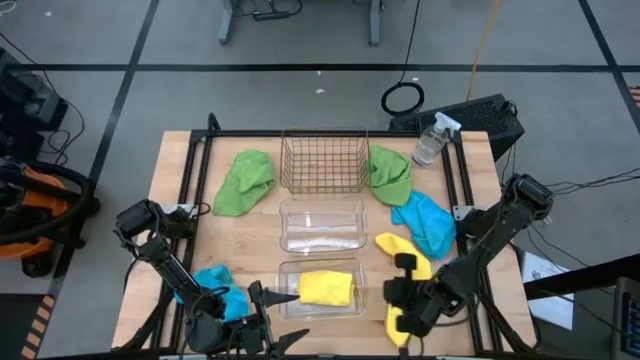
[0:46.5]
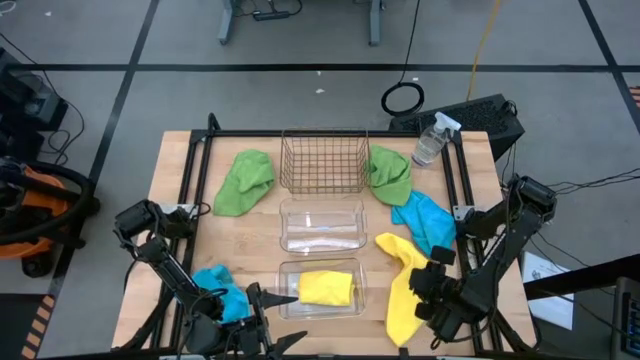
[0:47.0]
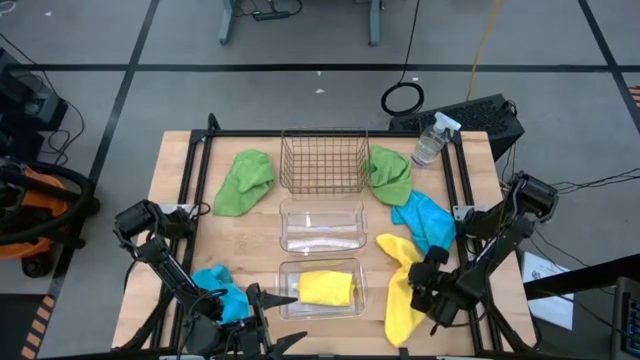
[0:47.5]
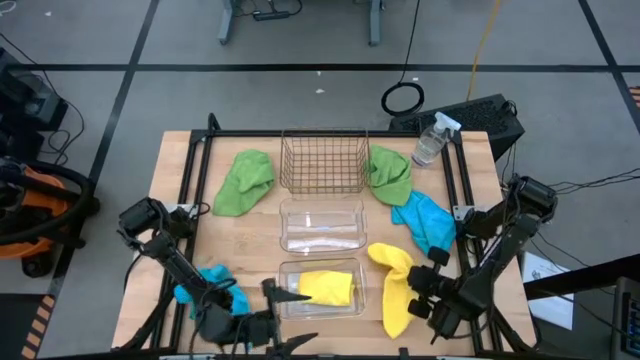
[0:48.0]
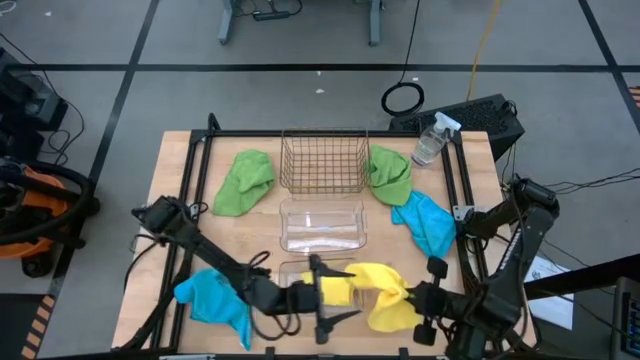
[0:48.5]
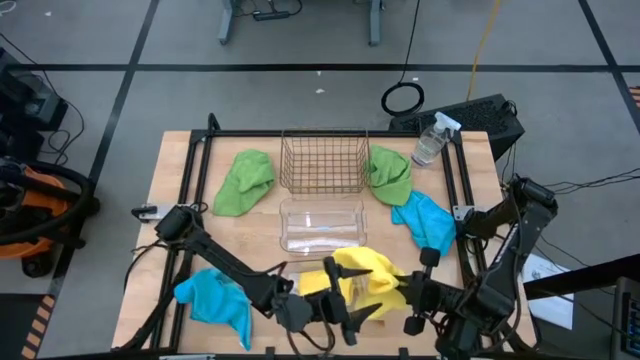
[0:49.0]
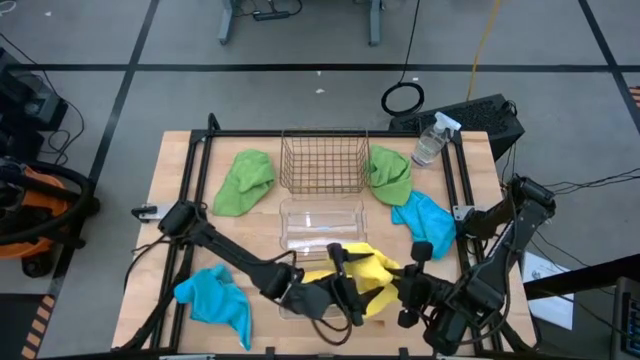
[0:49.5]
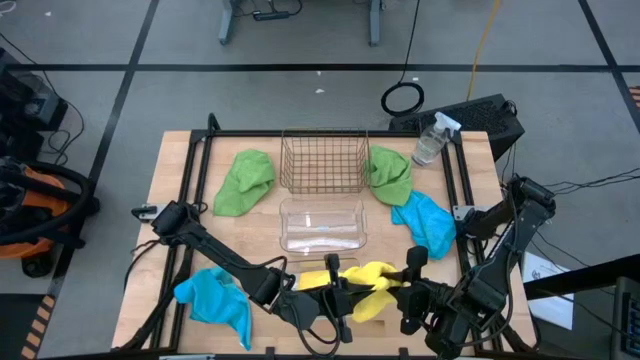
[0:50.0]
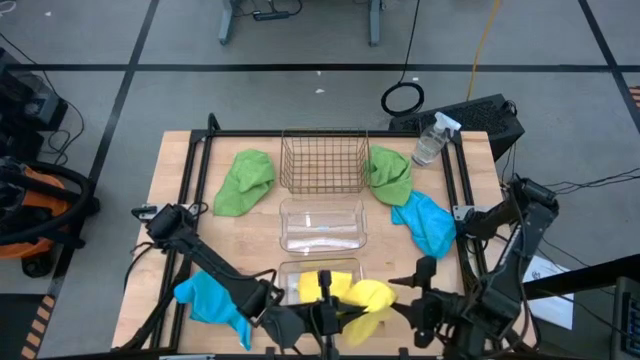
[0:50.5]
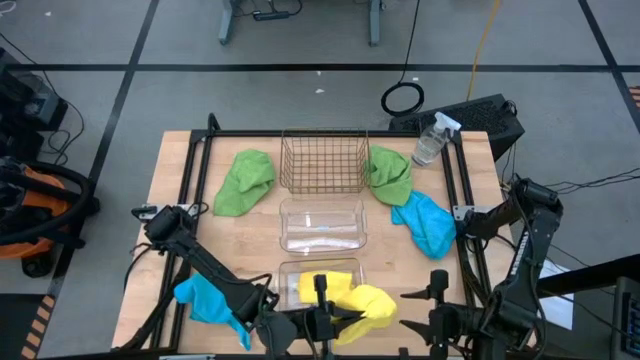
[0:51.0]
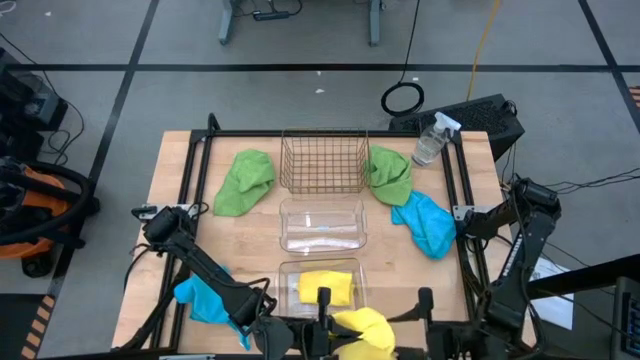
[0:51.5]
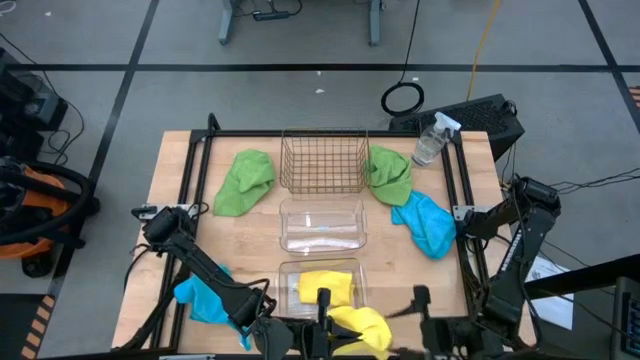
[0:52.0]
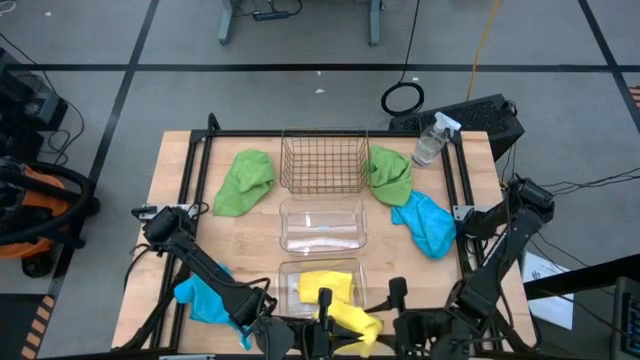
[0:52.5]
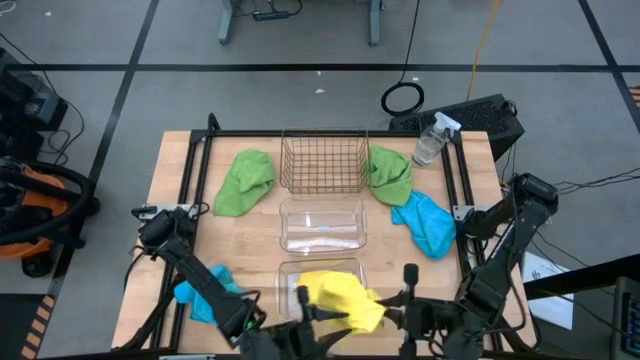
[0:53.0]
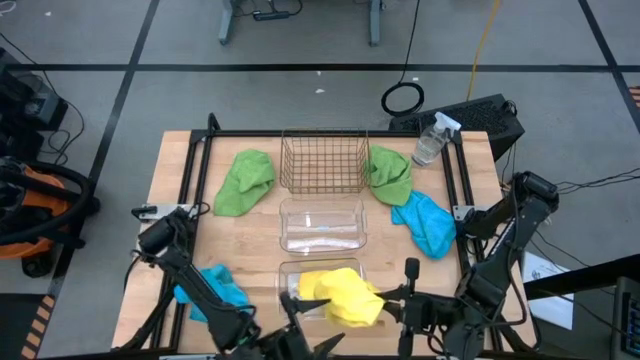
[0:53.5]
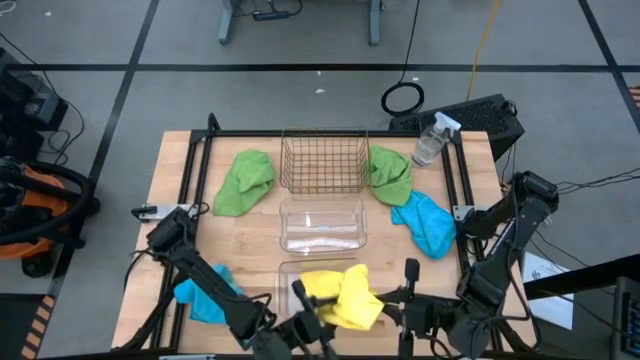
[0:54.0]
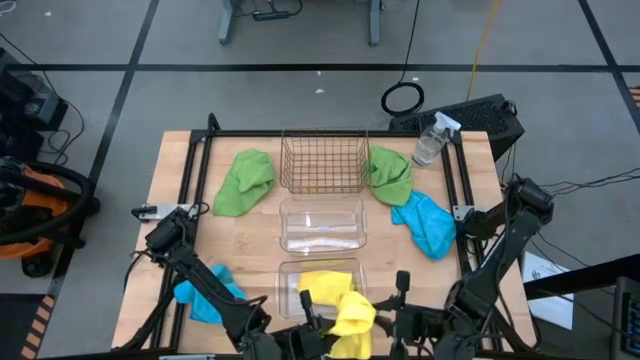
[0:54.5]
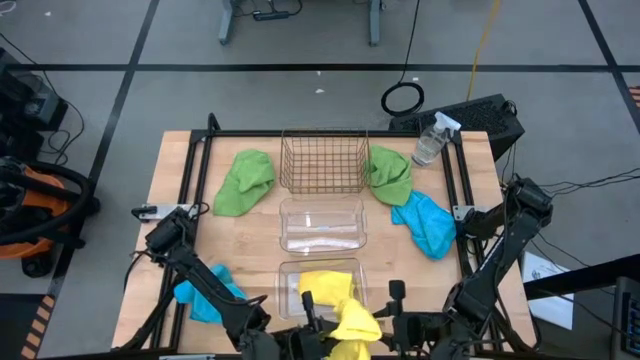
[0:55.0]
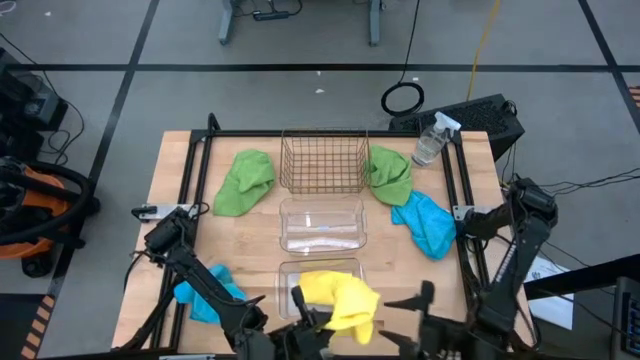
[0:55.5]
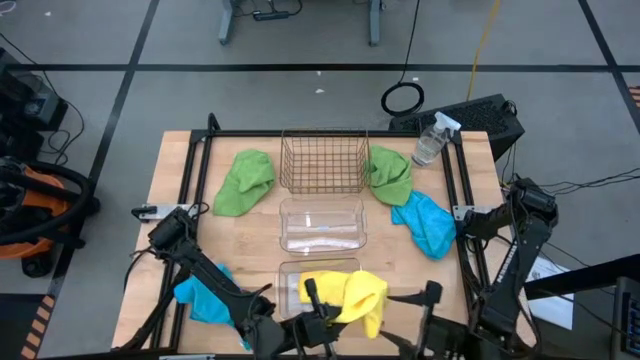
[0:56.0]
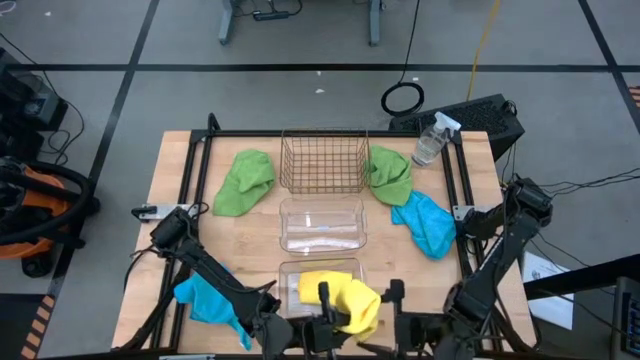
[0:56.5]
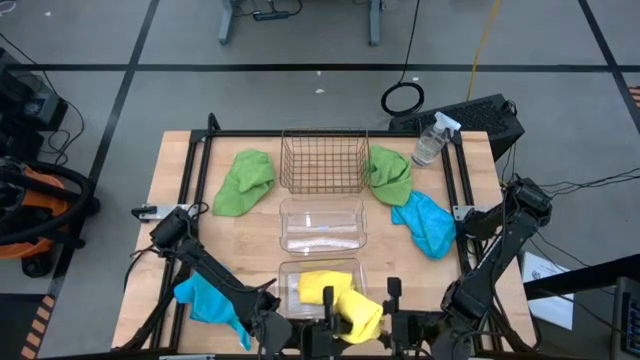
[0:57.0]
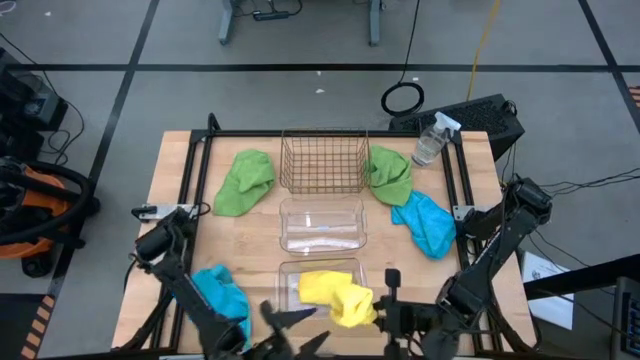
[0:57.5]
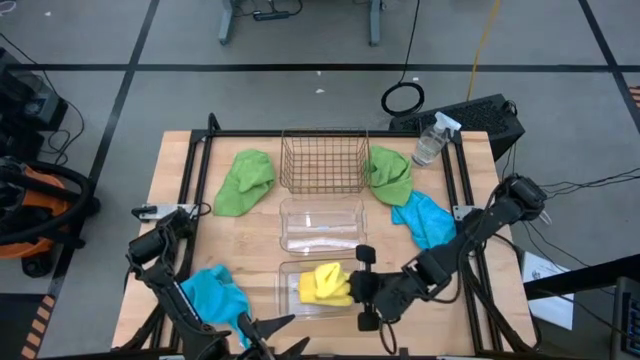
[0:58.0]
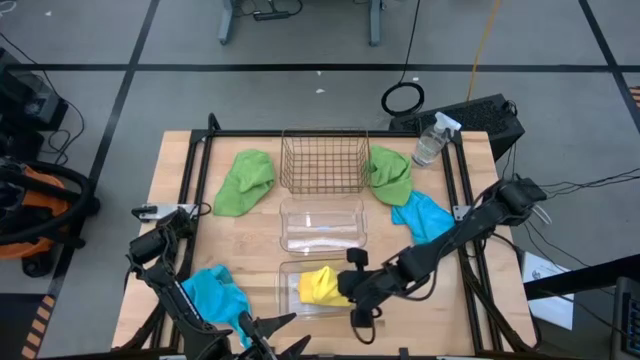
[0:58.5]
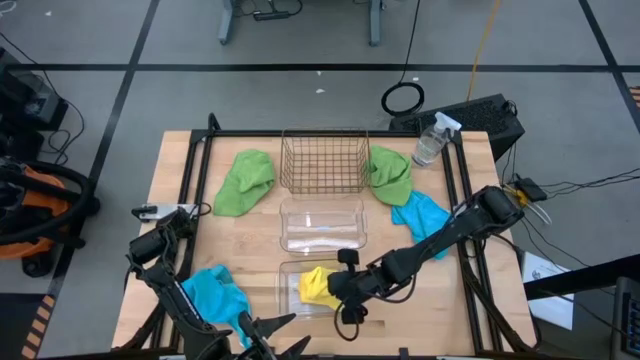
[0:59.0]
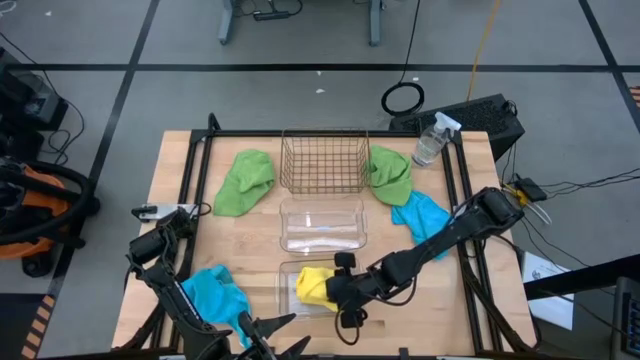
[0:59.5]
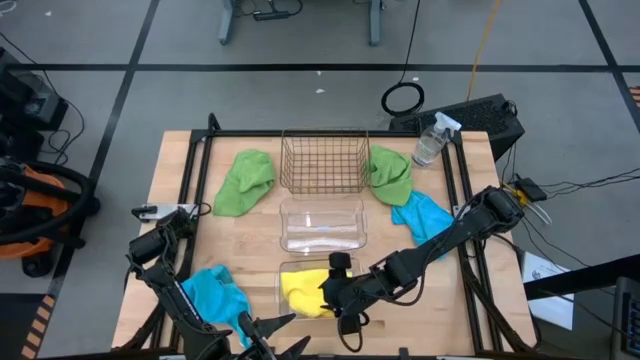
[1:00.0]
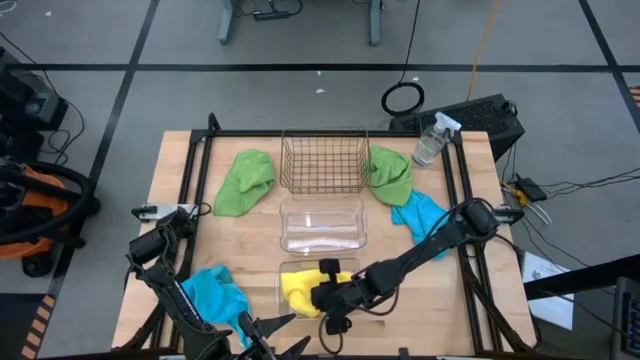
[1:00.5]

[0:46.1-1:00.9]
Task: Sort microfiber towel by color & place in baskets
Put the yellow towel into the bottom transparent bin

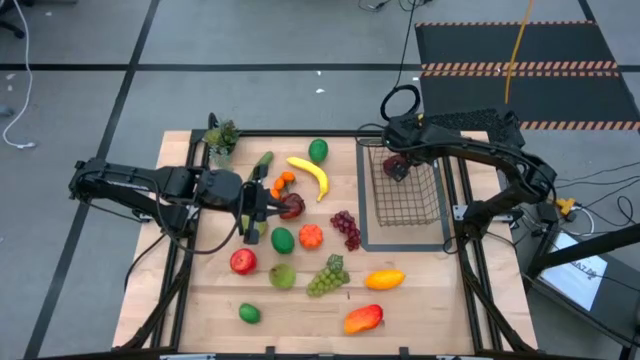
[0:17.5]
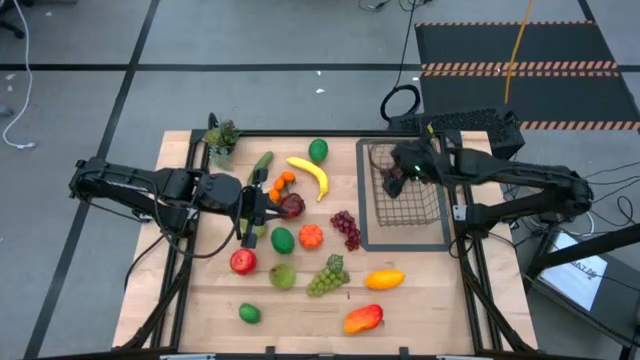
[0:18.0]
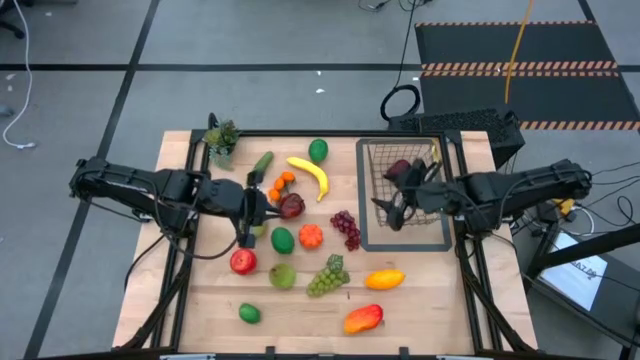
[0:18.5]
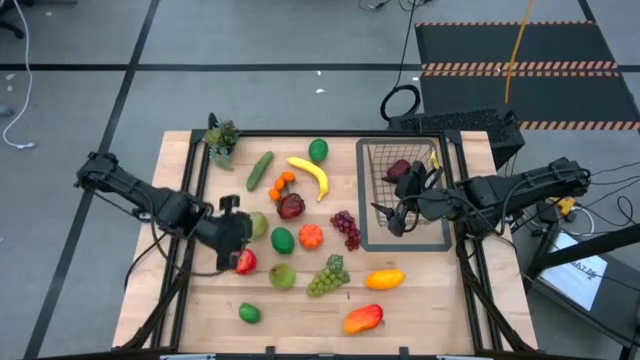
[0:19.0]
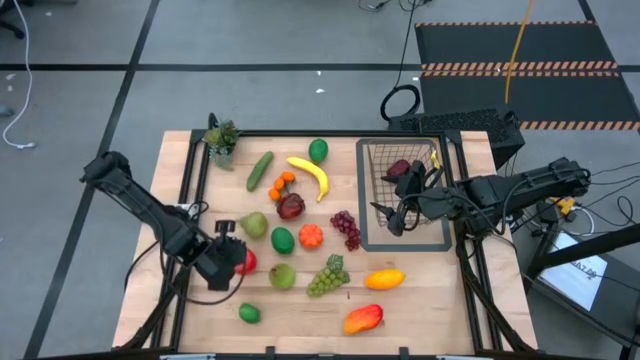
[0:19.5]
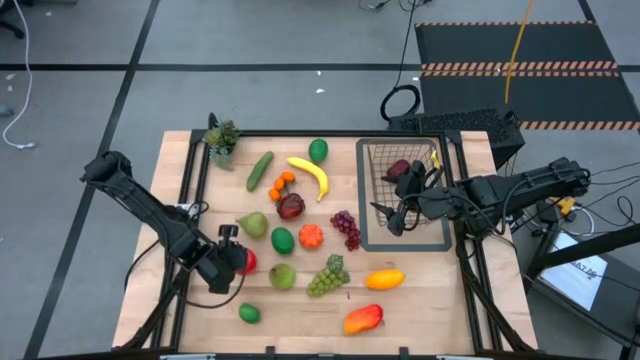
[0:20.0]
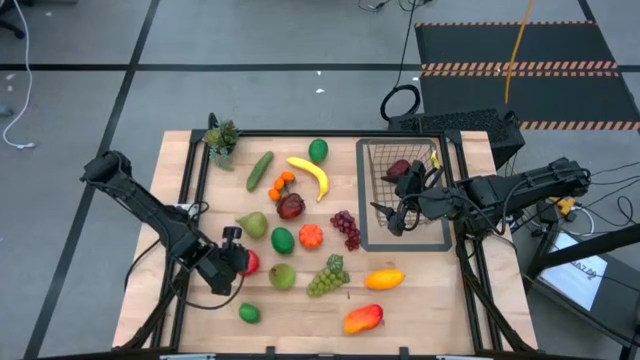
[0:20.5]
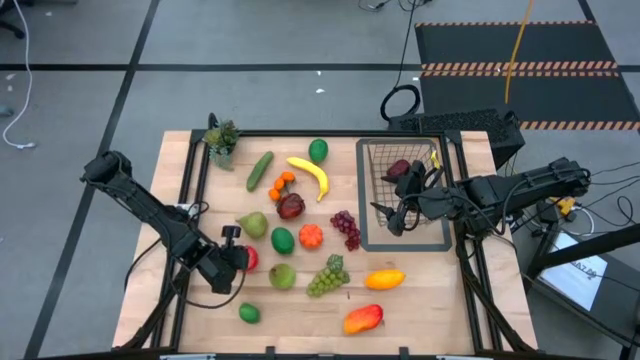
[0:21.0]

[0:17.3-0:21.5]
Task: Build produce basket
Put the bottom apple into the gold wire basket
